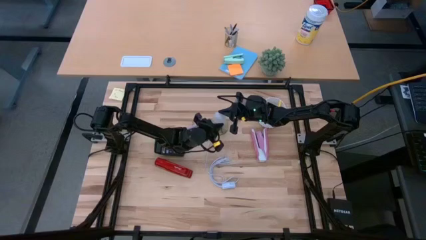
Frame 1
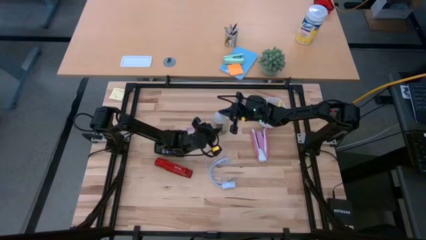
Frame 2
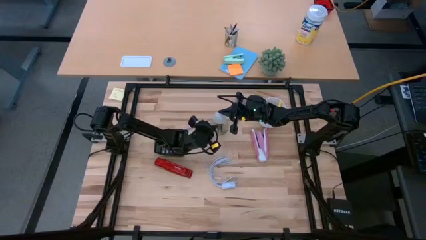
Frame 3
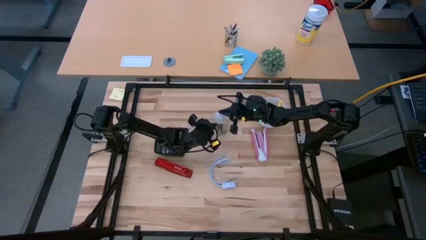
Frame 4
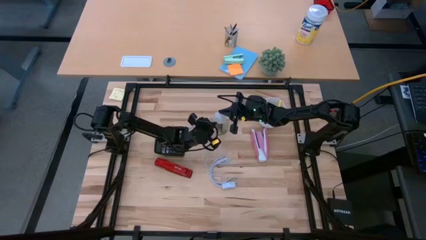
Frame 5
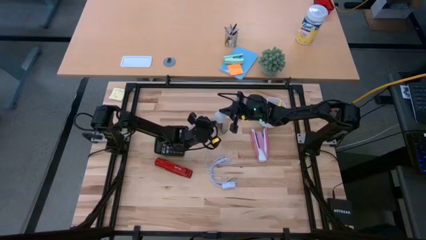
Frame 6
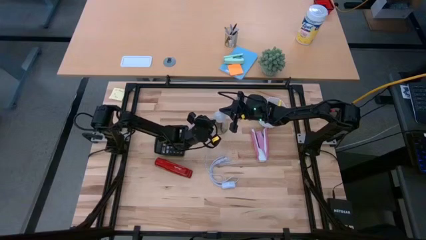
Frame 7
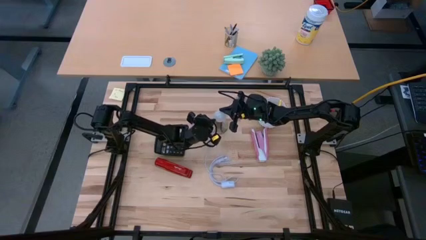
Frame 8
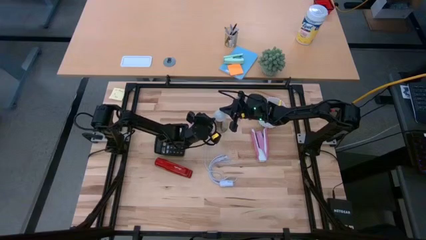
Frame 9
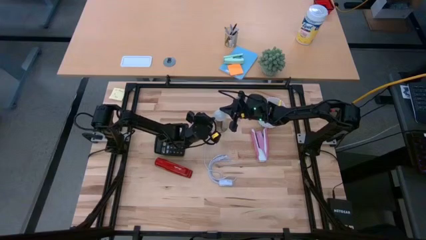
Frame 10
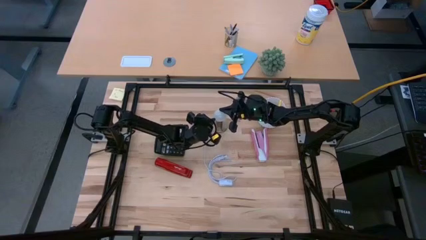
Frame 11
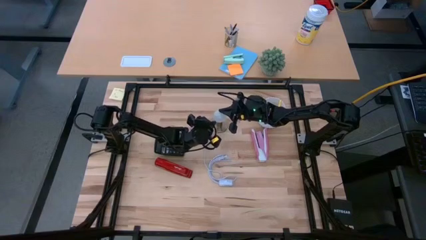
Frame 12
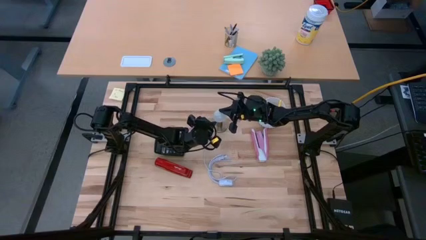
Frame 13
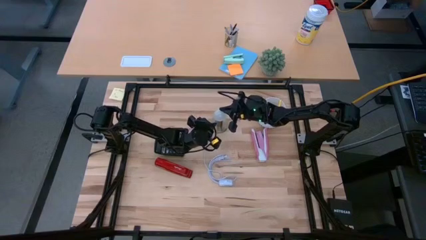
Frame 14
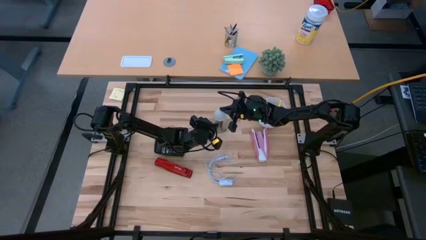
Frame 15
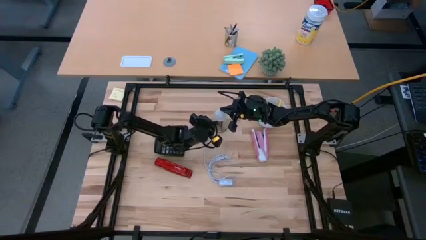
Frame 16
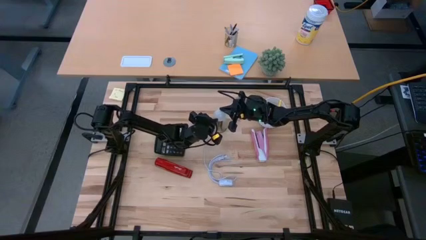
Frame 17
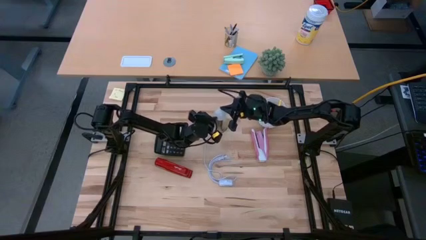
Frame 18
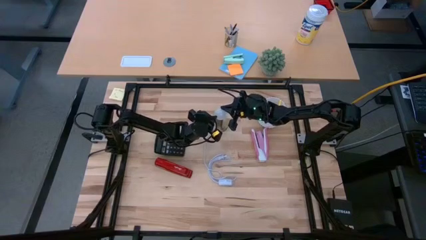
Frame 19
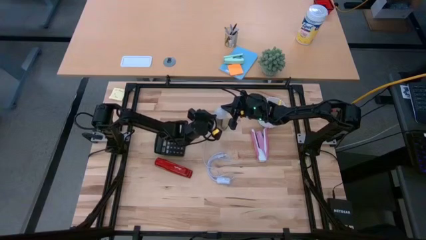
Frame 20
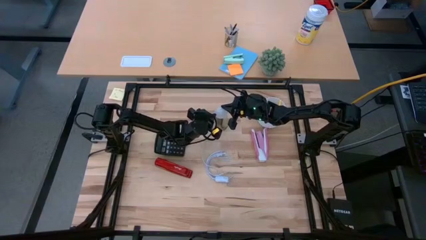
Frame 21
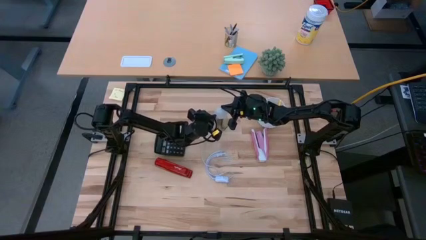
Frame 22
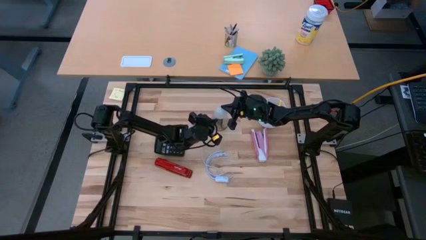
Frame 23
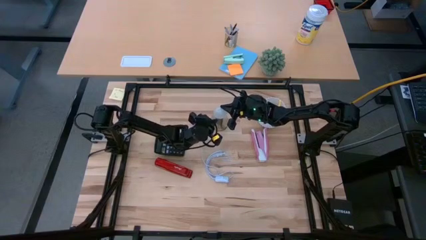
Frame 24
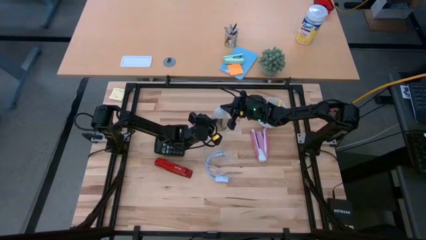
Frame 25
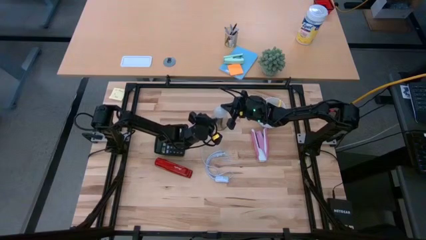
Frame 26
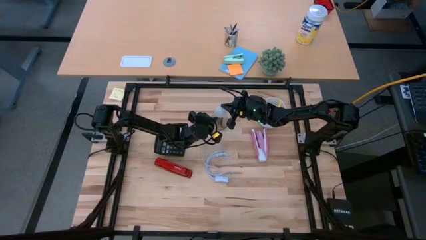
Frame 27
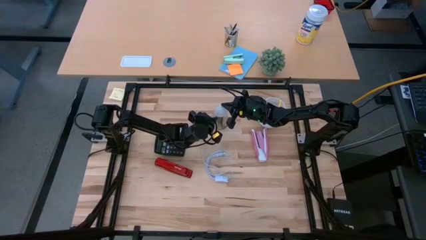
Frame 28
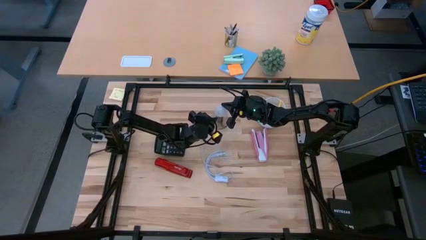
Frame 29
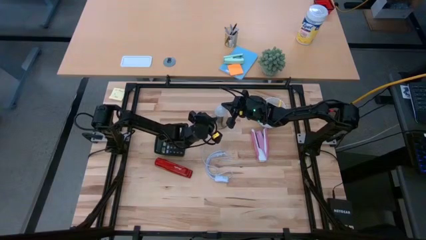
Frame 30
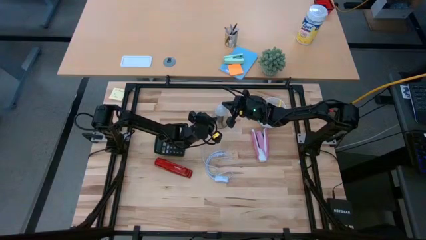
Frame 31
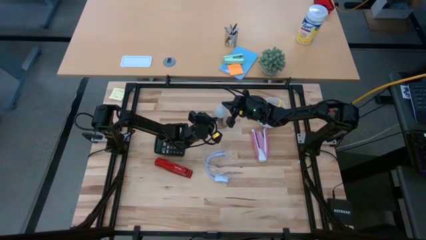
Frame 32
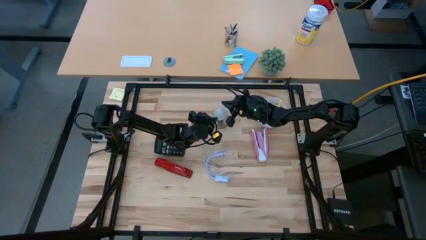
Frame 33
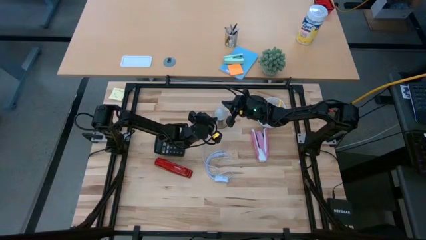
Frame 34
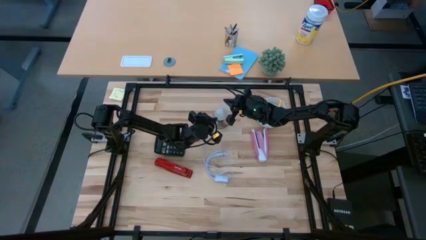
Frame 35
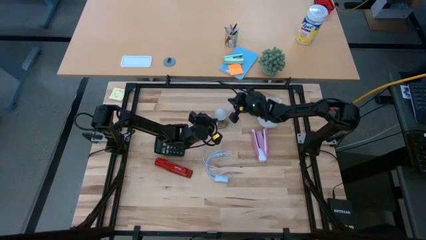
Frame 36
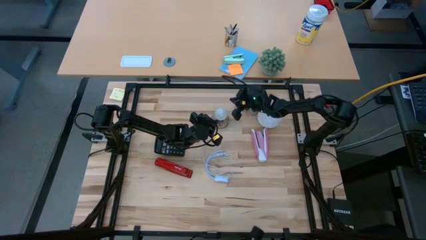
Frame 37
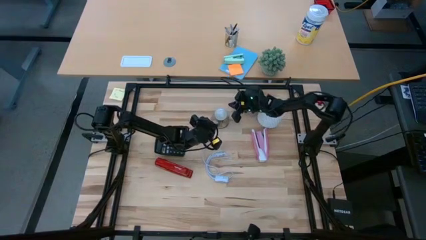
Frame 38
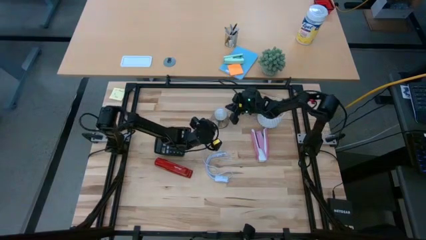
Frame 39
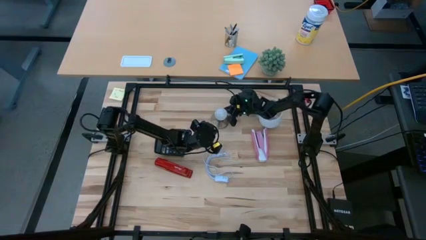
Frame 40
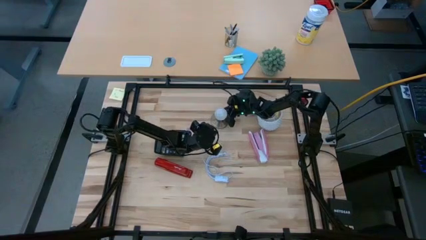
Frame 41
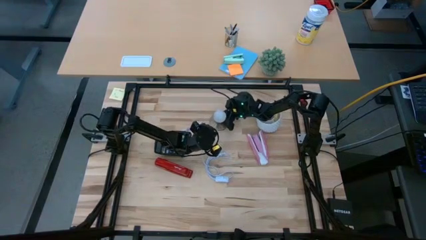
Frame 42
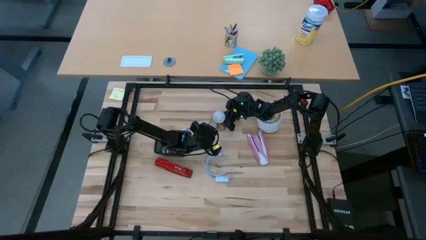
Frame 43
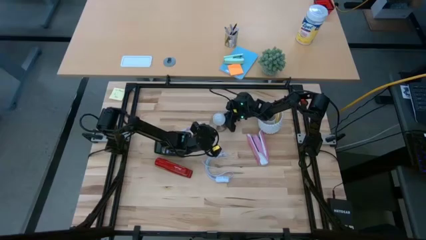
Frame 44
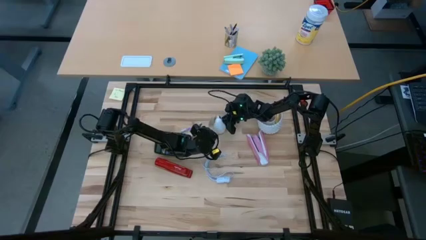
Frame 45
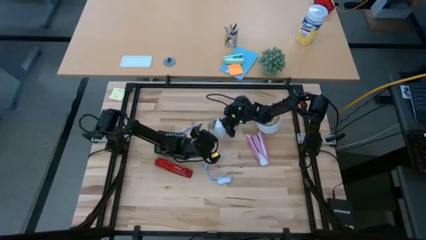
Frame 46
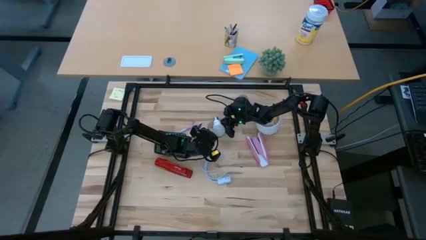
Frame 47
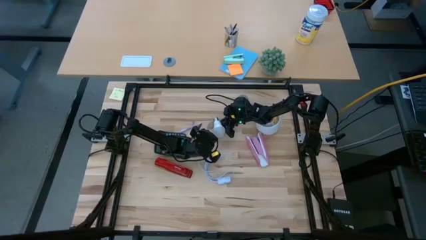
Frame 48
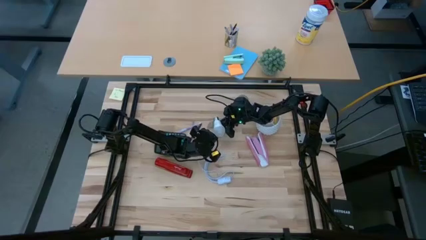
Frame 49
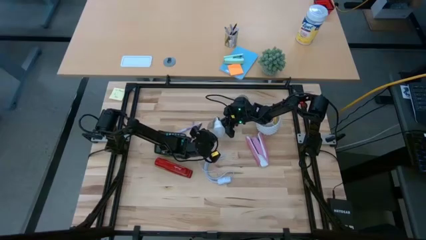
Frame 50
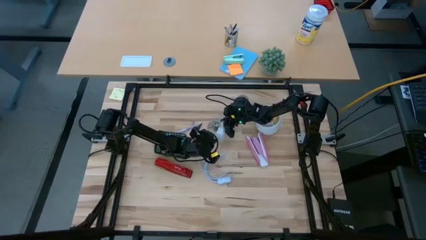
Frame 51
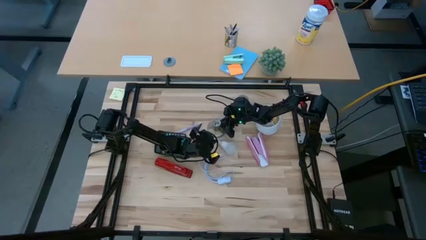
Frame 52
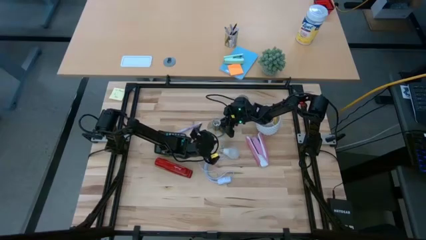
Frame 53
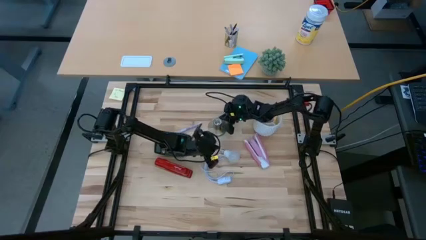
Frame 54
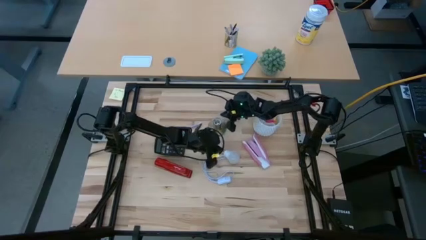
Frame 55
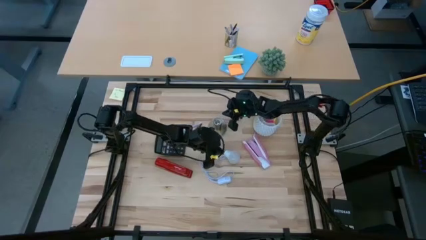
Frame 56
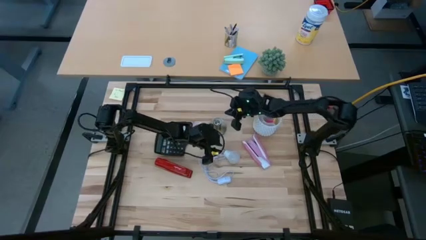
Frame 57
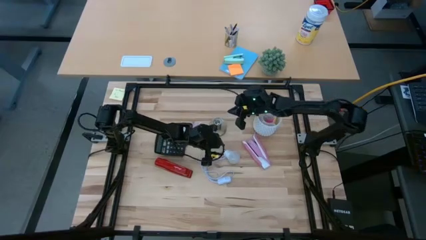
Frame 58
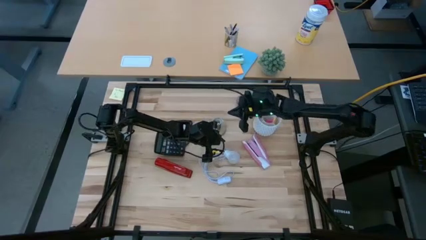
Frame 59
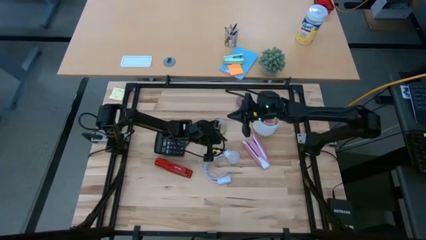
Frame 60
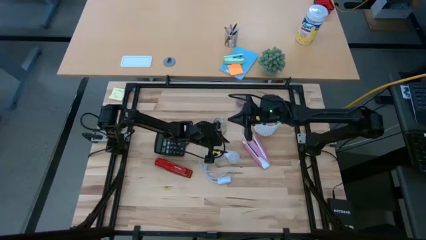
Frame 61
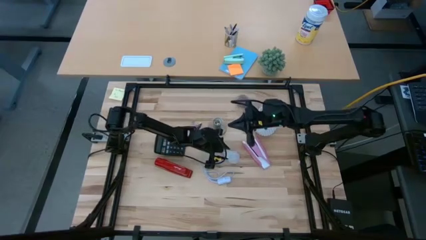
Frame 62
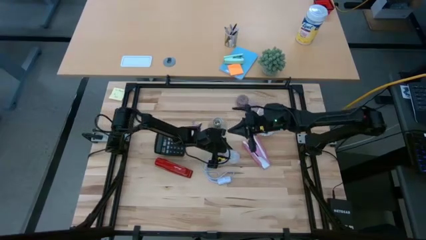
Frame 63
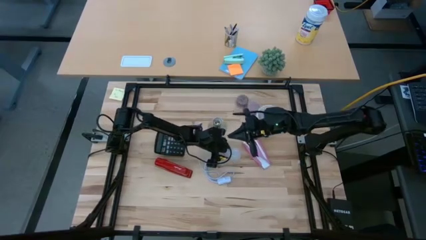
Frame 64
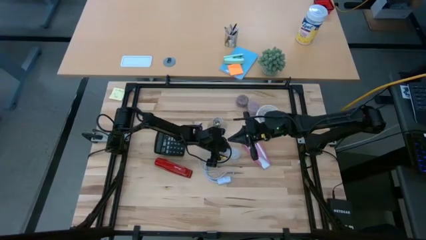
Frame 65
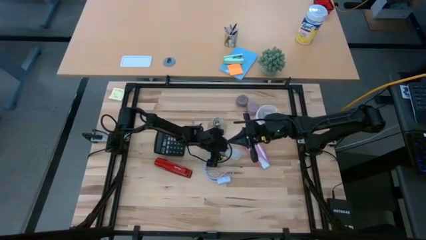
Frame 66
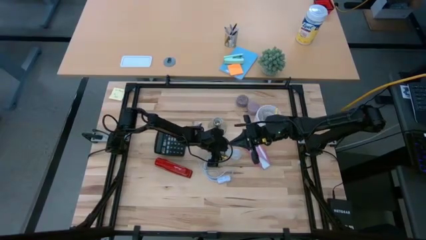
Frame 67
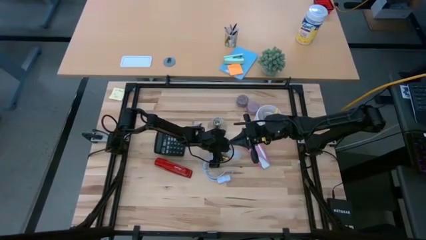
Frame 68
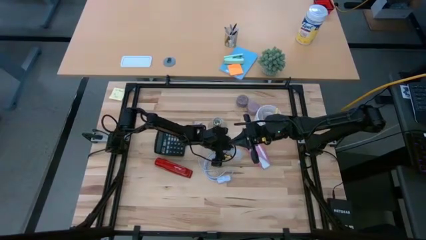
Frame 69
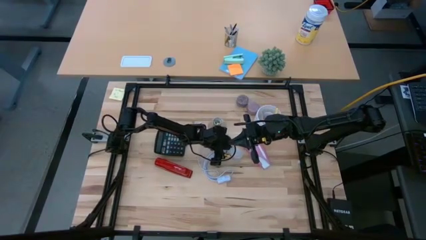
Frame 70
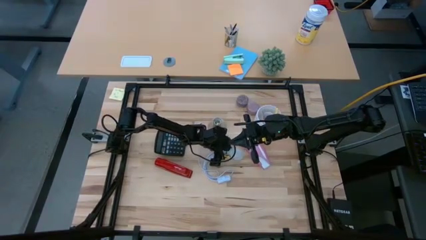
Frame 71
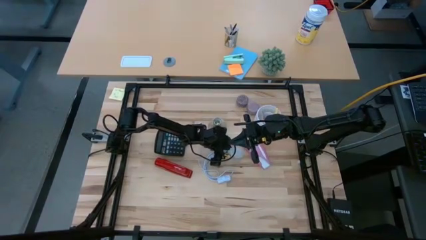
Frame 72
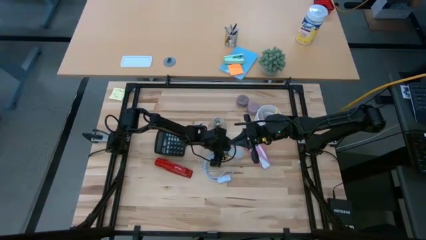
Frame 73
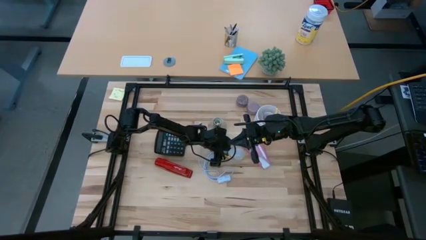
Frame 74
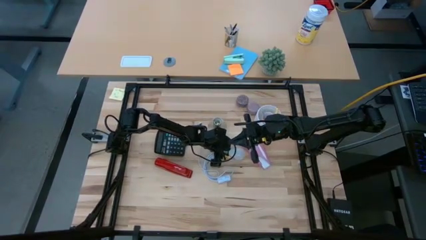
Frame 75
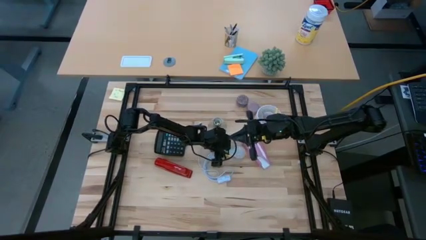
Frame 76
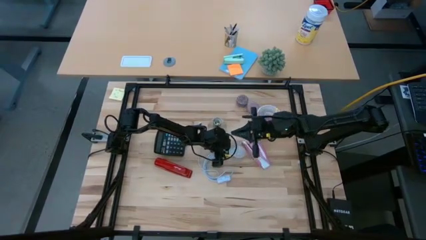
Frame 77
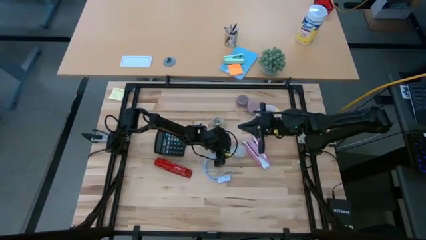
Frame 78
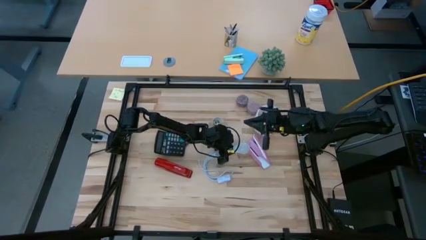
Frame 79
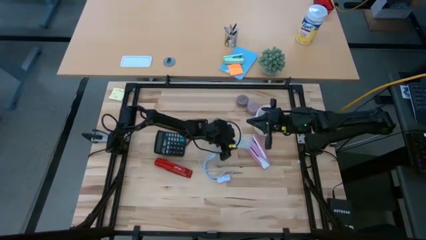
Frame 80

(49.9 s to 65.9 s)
Task: Screw lightbulb
Insert the white lightbulb into the golden lamp
